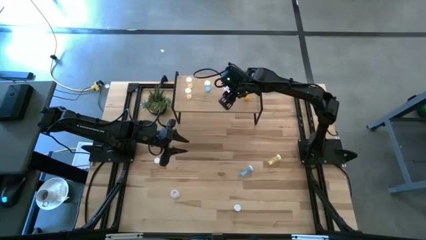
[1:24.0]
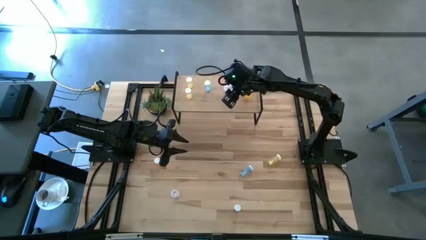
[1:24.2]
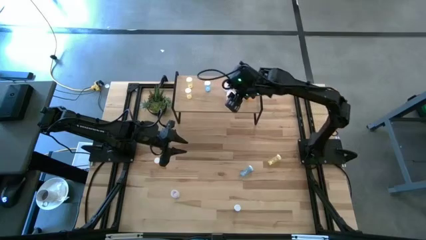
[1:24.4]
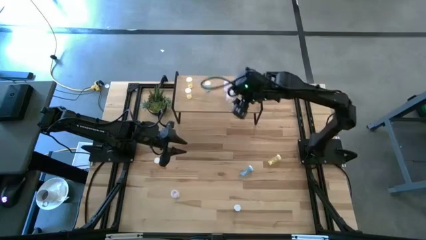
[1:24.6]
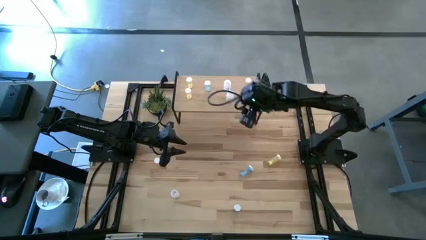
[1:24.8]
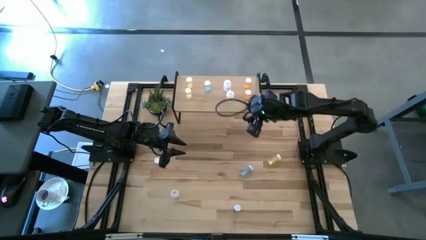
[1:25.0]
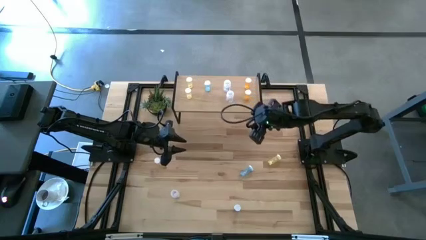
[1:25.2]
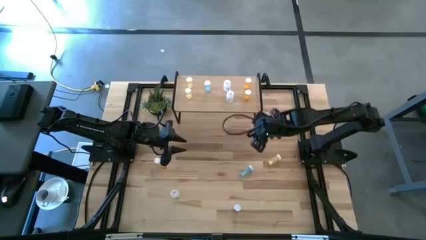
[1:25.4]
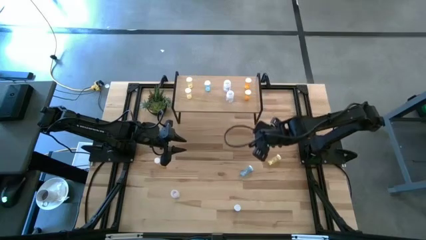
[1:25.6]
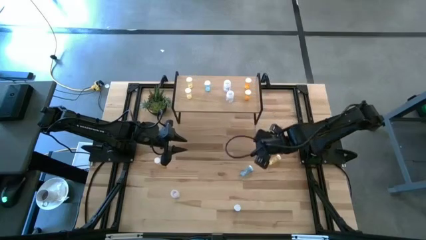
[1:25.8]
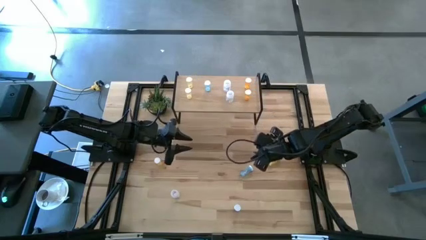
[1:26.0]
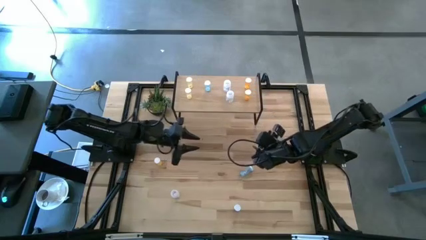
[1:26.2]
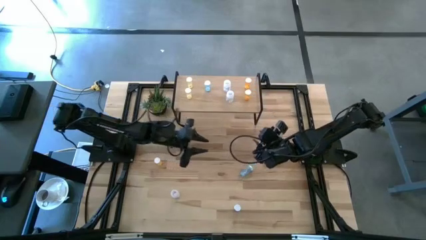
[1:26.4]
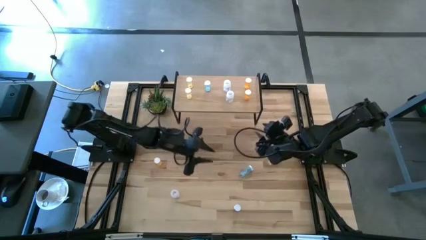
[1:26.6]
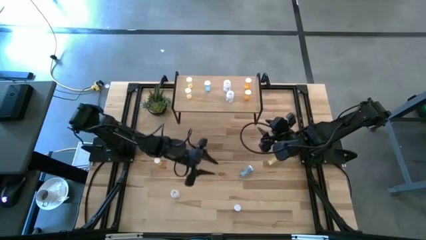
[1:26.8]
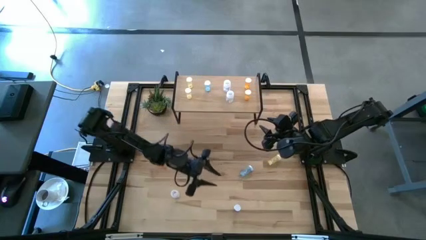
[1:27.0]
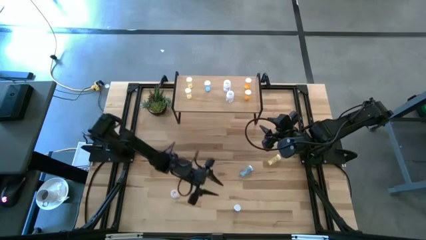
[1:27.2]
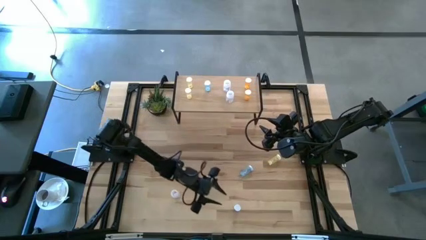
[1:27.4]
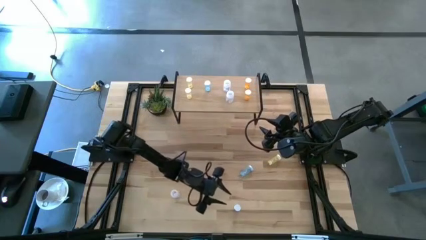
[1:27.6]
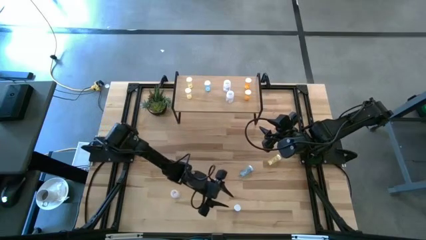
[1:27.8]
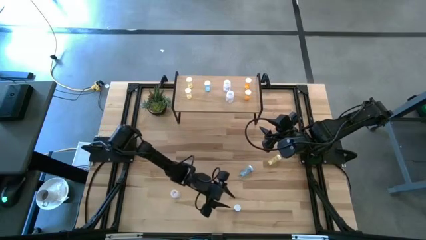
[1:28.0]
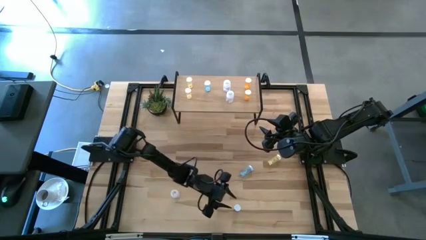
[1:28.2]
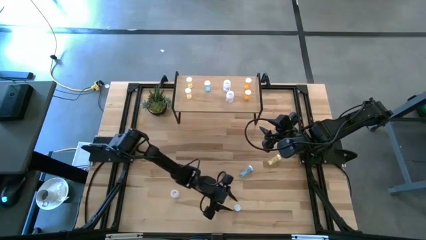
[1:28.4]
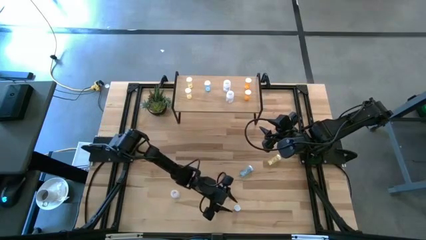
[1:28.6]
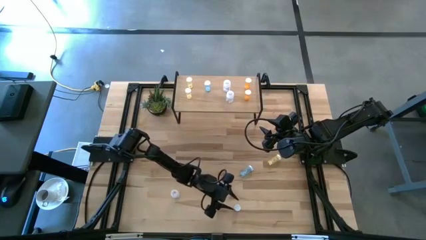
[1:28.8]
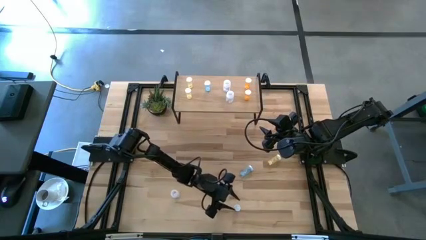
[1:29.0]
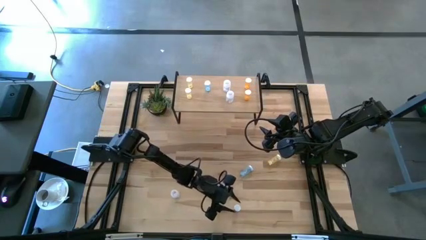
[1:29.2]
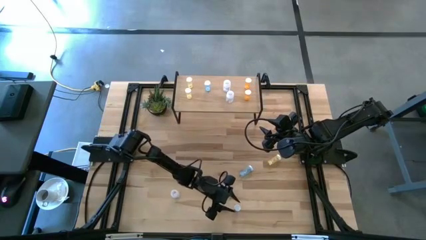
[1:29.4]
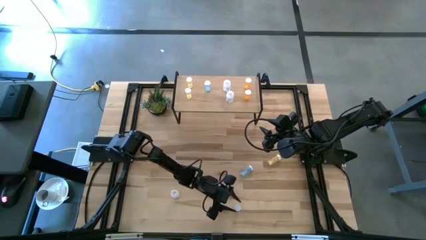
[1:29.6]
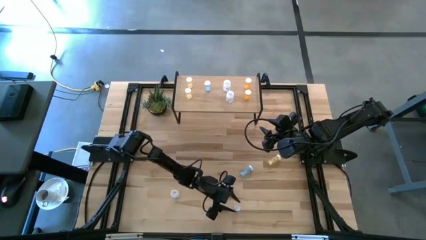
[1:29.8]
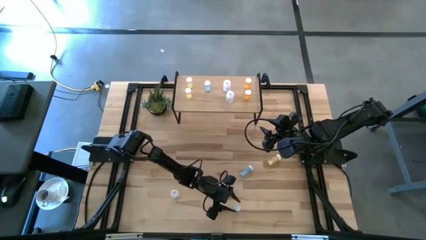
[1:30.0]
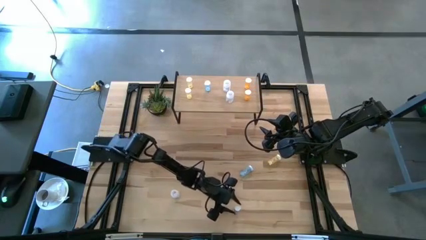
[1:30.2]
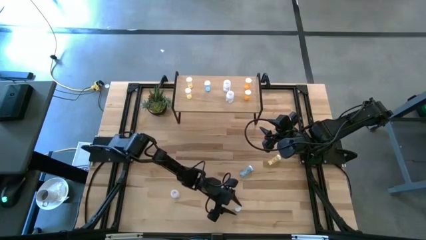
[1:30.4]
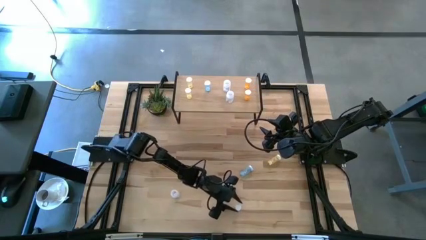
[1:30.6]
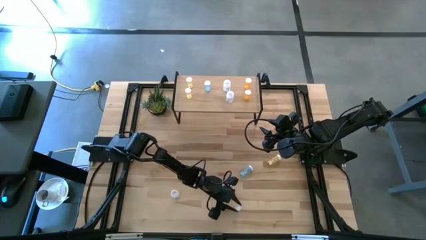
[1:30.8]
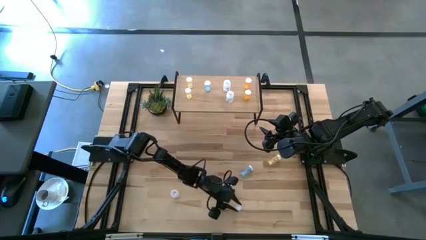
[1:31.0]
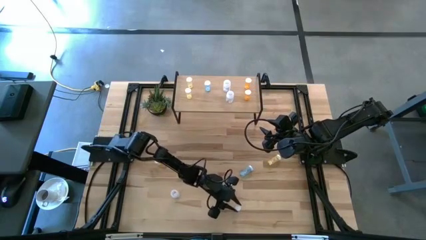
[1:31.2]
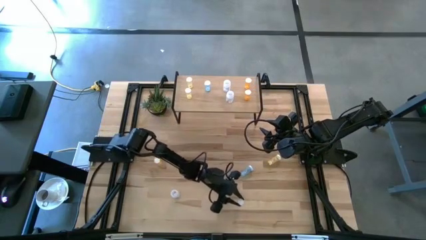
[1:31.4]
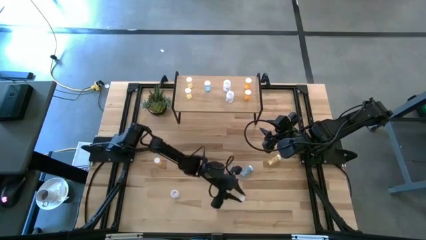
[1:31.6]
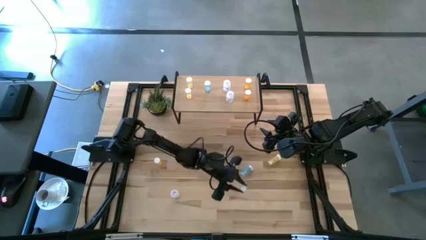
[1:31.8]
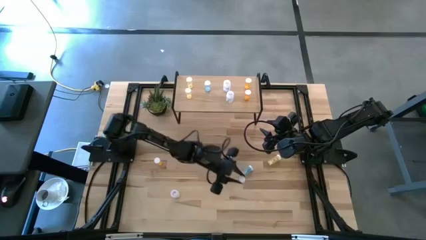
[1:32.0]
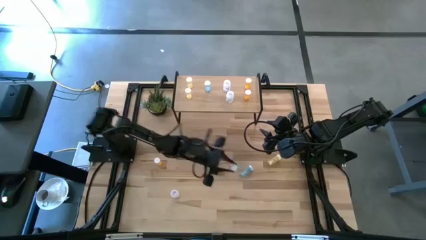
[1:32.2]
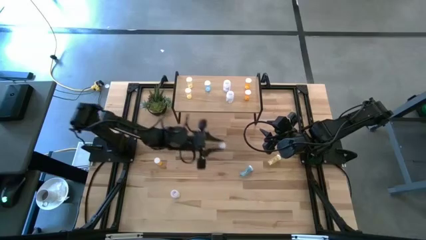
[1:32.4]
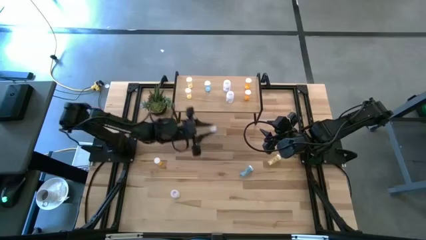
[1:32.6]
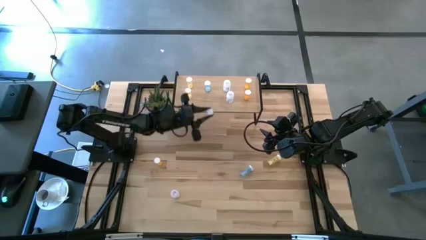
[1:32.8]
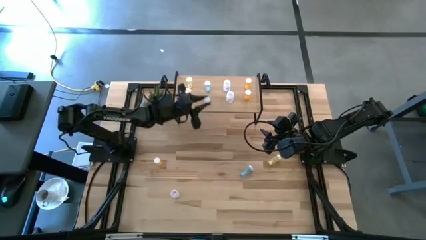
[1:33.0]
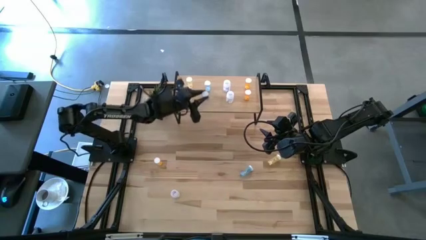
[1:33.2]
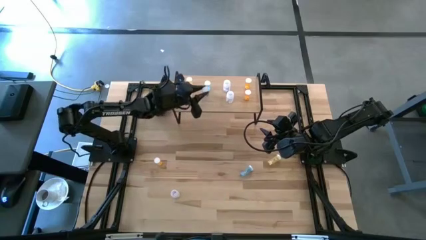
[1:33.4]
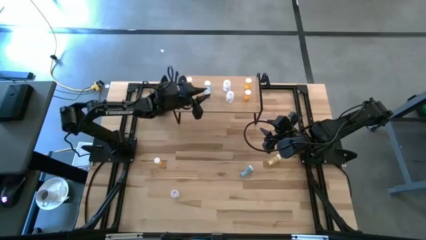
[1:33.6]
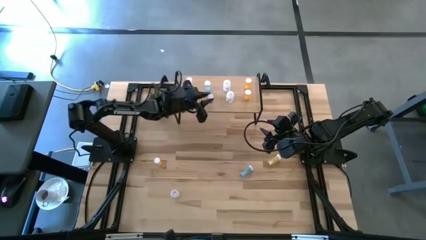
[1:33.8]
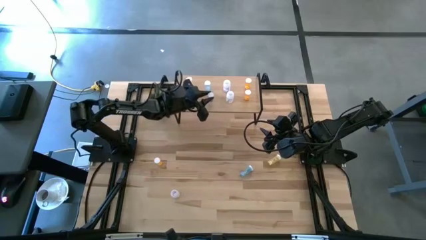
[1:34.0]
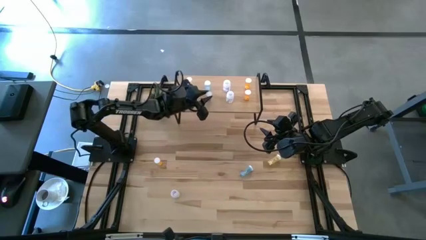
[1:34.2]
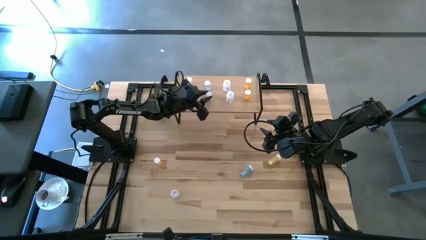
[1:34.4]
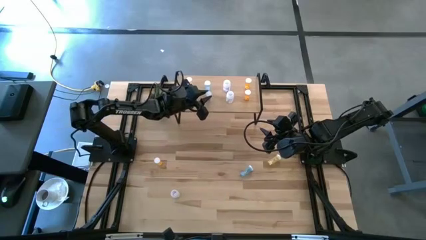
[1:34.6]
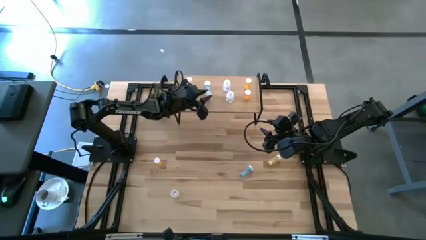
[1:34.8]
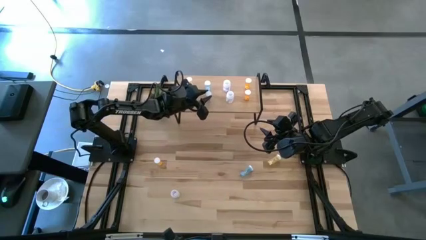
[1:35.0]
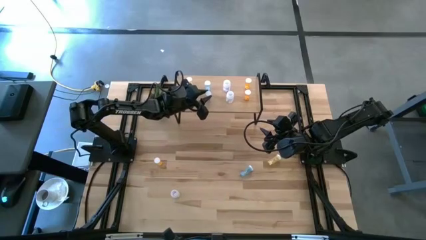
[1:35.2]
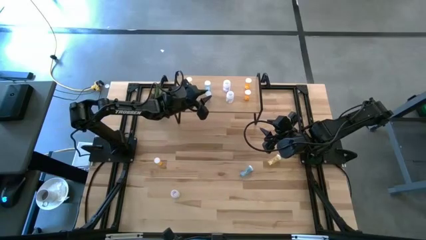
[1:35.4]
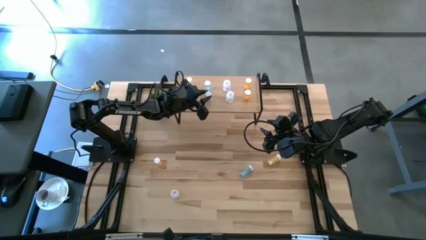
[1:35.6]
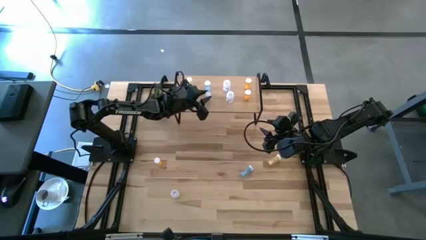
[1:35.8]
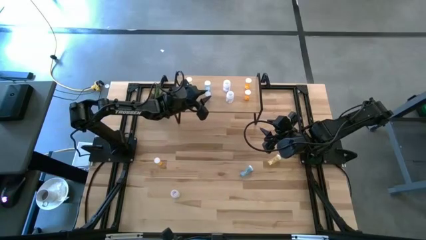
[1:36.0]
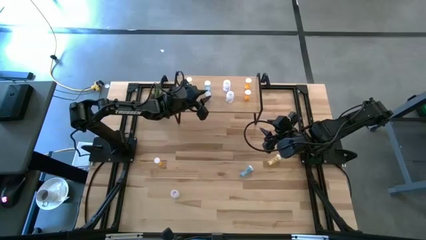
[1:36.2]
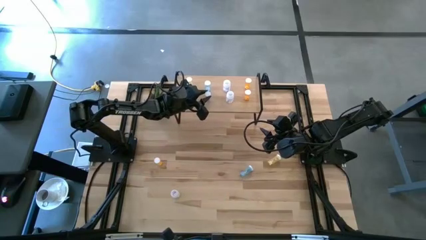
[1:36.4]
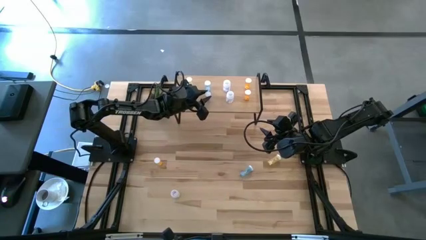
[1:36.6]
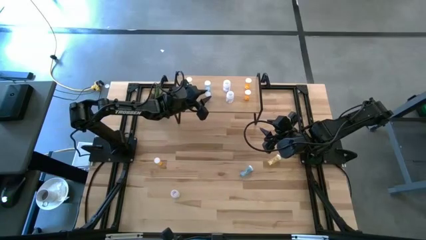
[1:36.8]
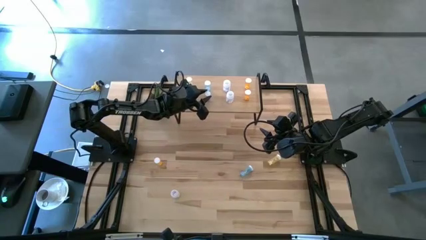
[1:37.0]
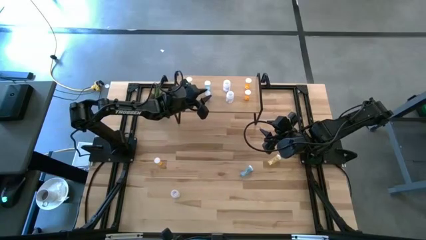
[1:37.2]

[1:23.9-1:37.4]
Task: Pick and place medicine bottles onto shelf by color
Put the bottom blue pill bottle on the shelf

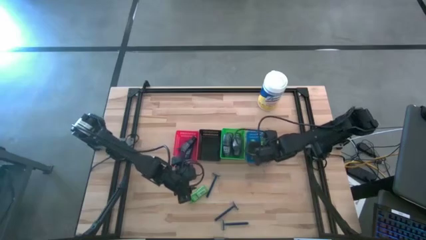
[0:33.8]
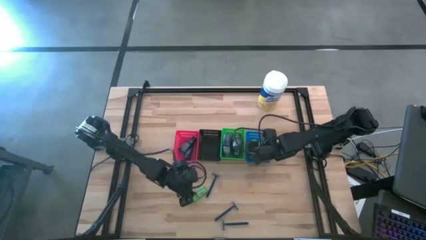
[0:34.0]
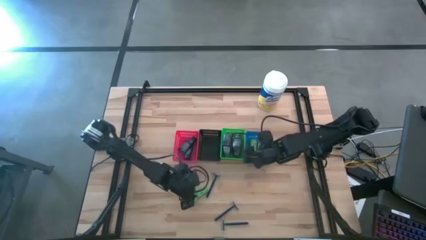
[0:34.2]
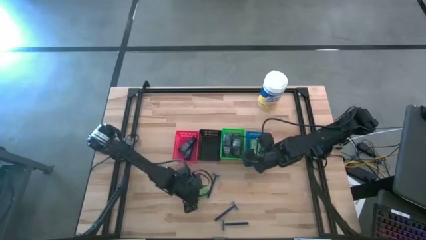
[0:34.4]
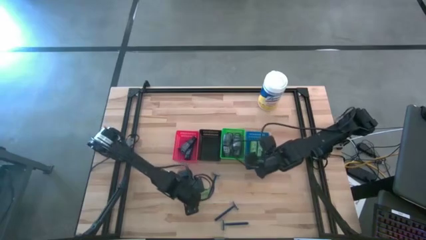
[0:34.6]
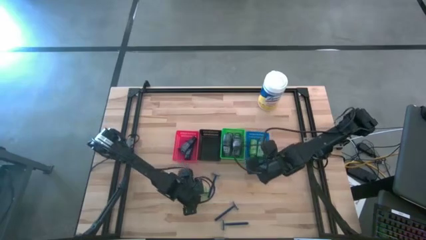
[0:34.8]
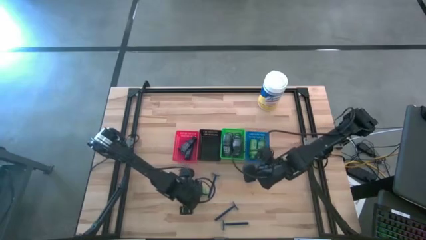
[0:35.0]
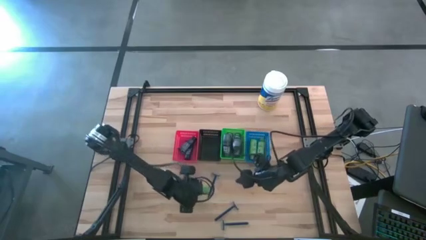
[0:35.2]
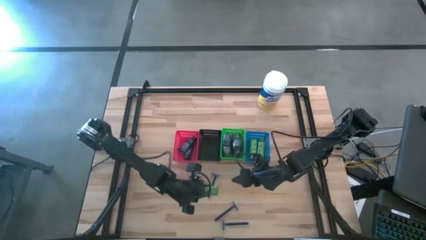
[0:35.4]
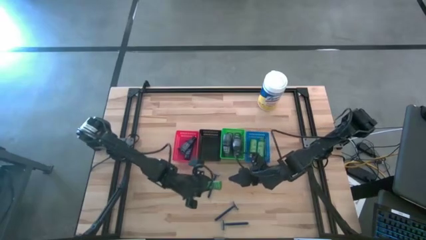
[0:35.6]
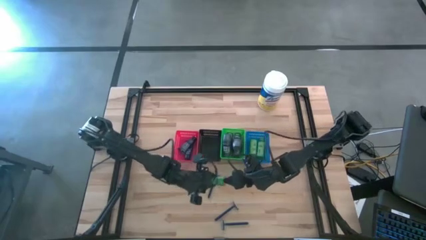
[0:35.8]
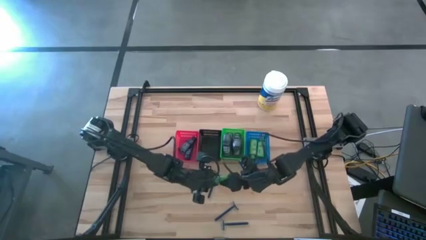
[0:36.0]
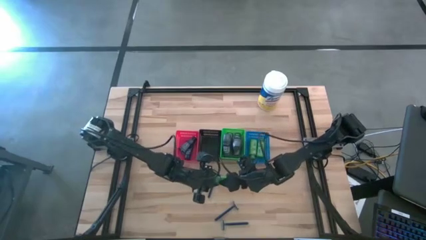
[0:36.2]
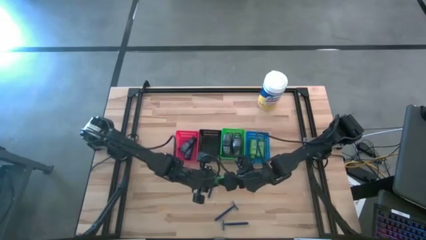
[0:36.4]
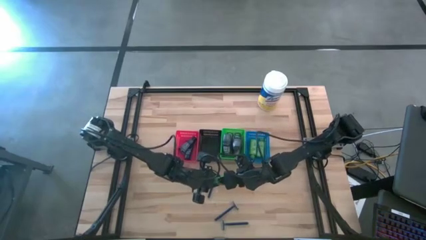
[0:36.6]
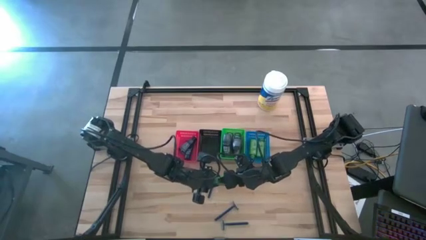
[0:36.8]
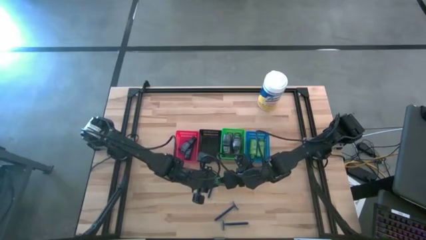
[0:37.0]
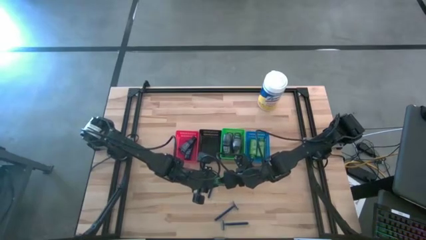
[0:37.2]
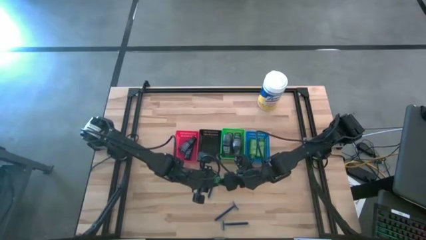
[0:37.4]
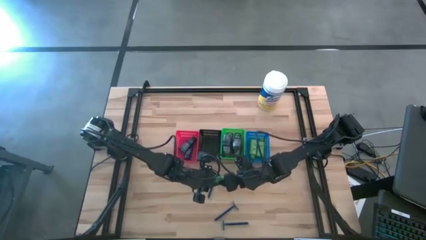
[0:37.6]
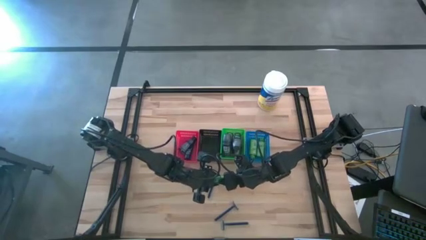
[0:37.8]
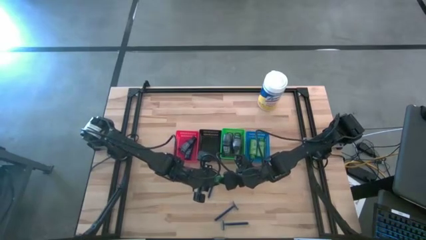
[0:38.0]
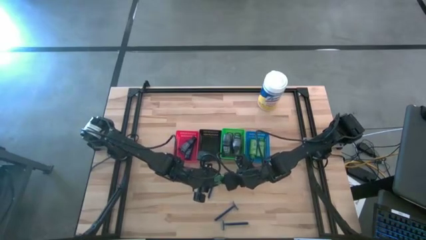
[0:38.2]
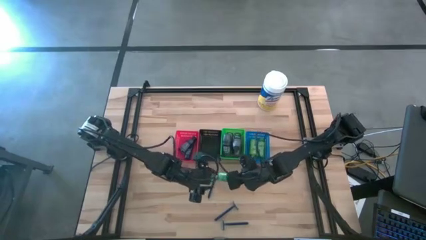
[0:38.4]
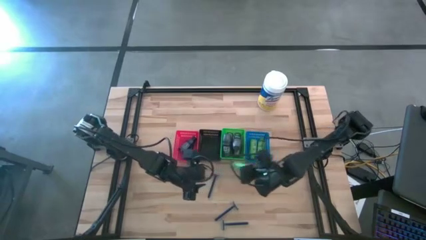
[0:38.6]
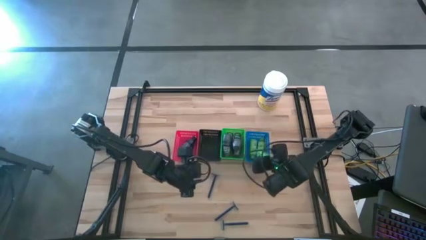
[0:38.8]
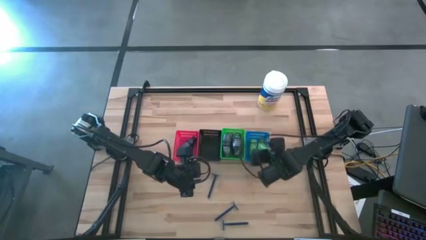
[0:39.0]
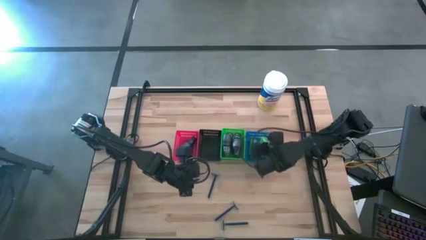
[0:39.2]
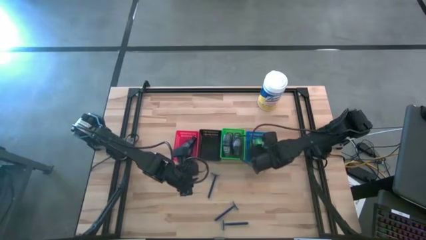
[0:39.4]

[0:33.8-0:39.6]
Task: Pick & Place Travel size toiletries
Put the green shampoo into the blue basket
